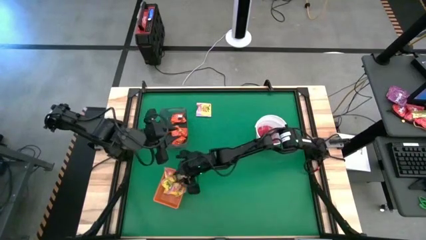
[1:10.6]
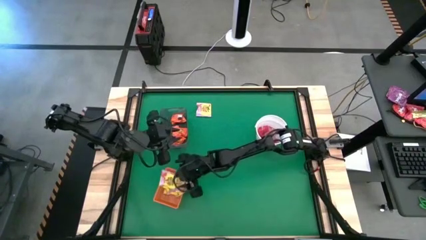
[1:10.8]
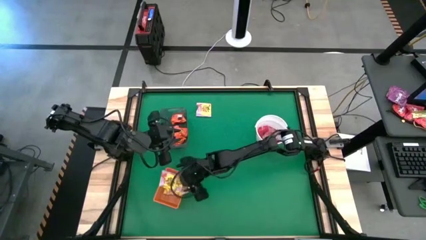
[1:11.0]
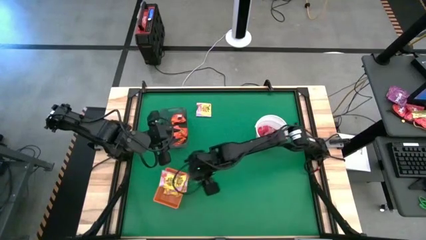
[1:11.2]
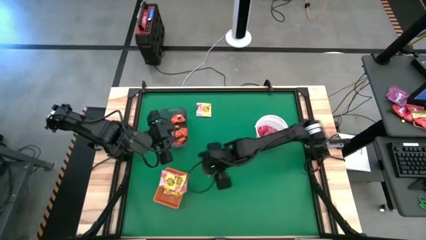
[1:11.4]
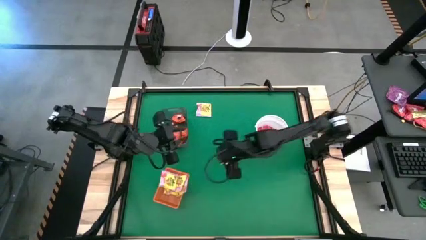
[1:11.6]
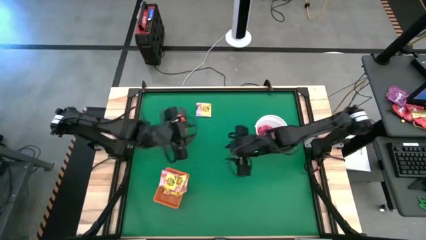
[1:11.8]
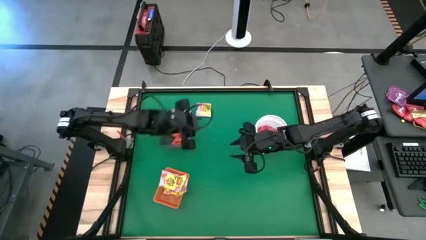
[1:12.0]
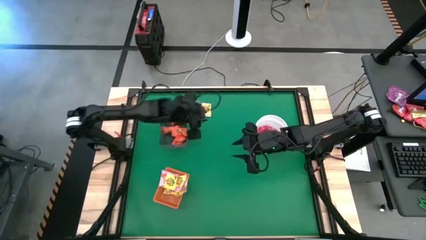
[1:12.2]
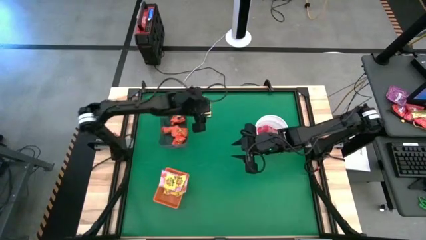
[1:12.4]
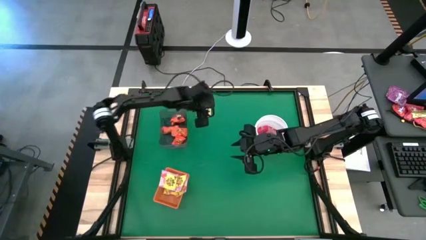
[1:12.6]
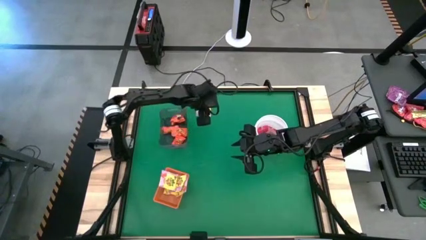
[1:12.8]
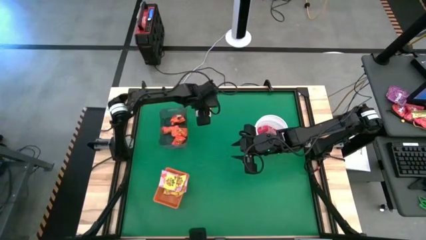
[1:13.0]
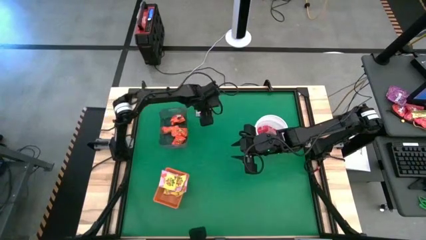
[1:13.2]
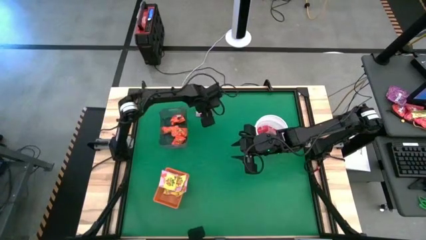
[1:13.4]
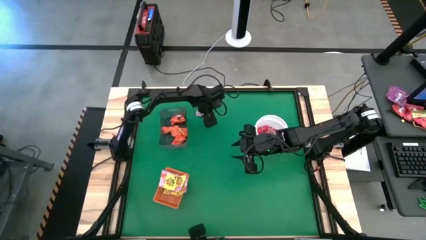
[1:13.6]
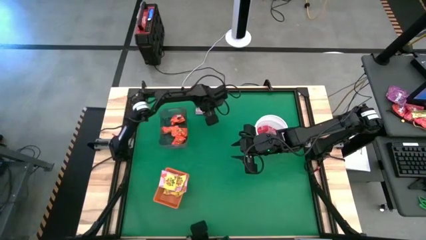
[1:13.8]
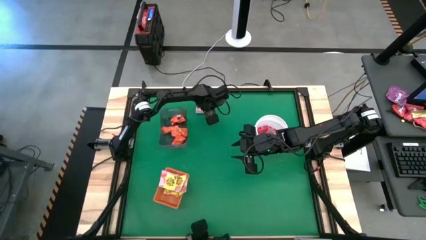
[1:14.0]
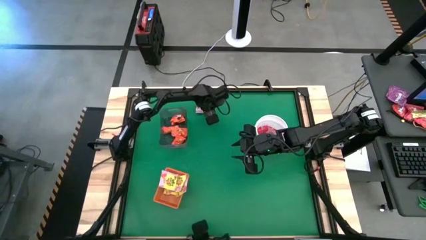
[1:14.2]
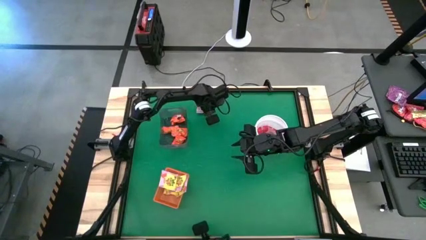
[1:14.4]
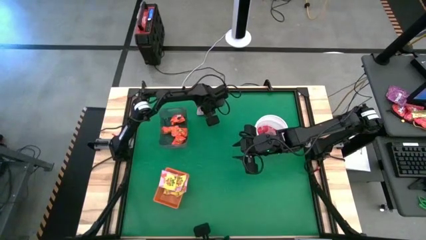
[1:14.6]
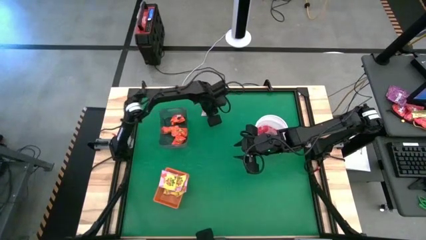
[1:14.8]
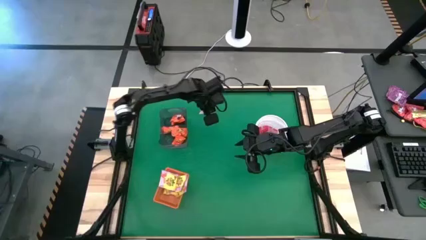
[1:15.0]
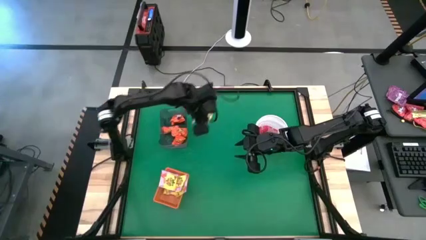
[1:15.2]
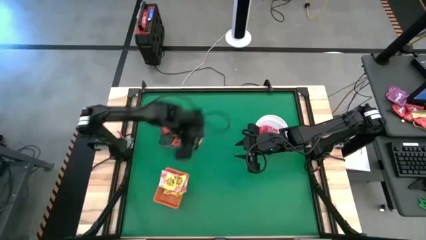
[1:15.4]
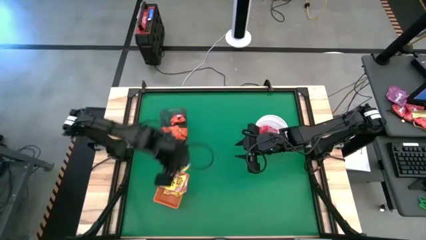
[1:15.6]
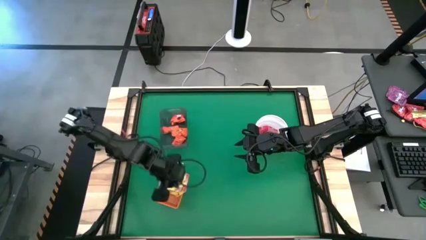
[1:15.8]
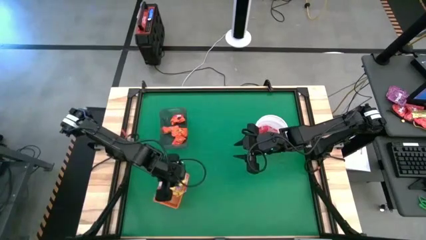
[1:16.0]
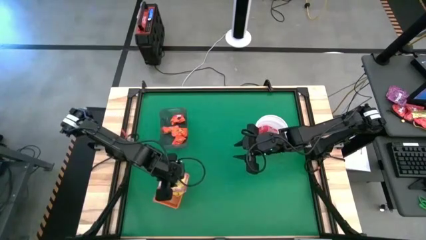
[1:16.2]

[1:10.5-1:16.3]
Task: Sort candy by brand, put in halloween buckets
Put the yellow candy into the orange bin

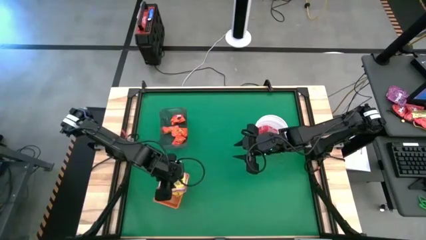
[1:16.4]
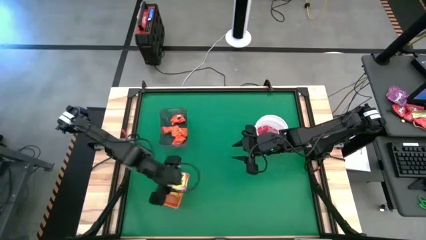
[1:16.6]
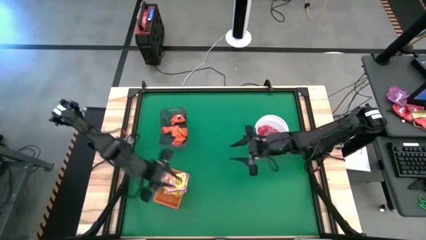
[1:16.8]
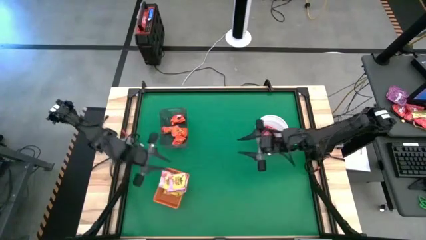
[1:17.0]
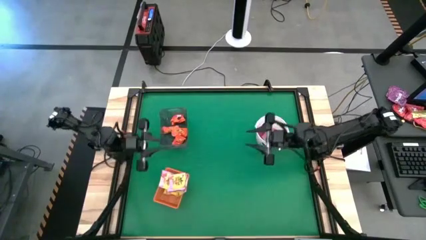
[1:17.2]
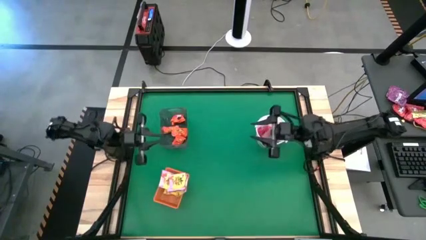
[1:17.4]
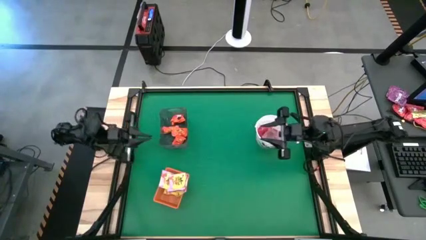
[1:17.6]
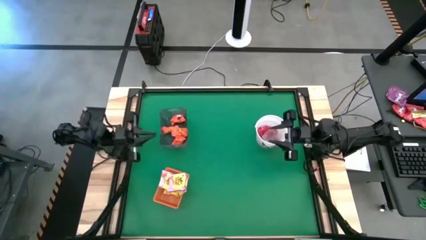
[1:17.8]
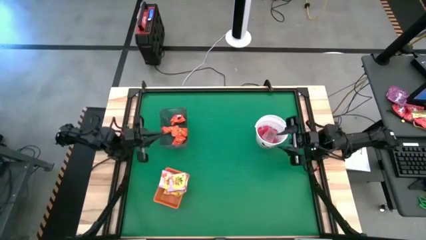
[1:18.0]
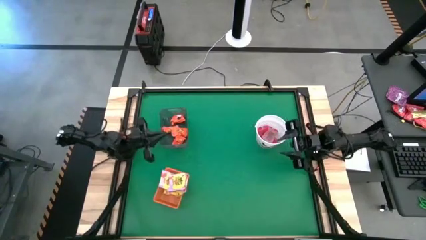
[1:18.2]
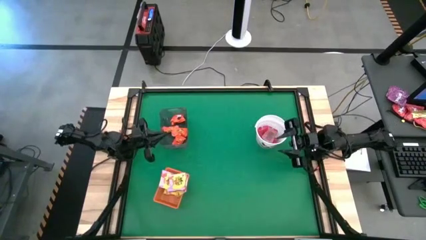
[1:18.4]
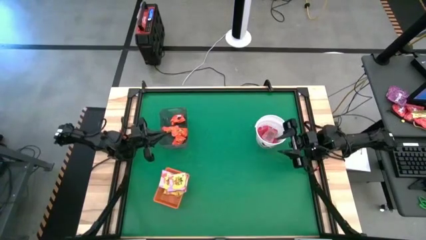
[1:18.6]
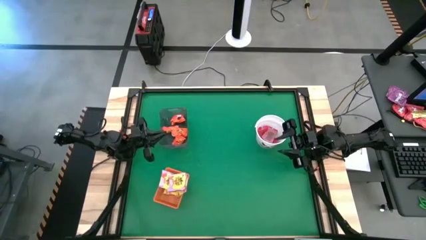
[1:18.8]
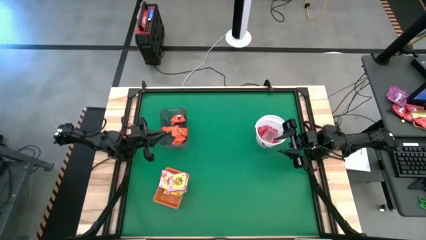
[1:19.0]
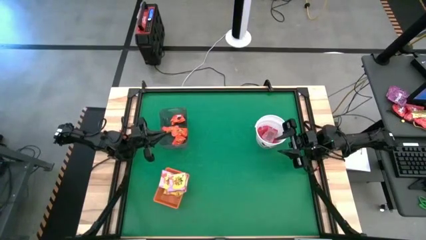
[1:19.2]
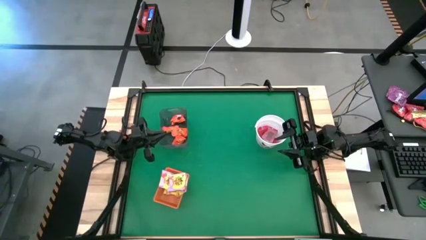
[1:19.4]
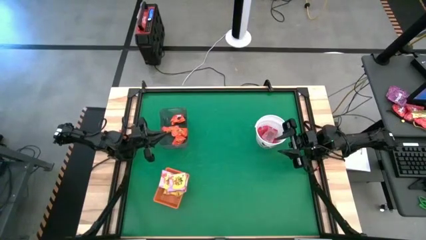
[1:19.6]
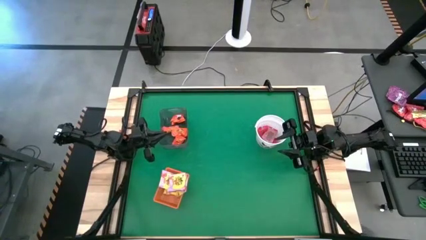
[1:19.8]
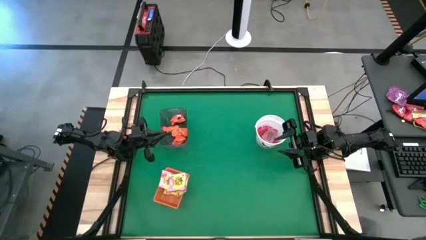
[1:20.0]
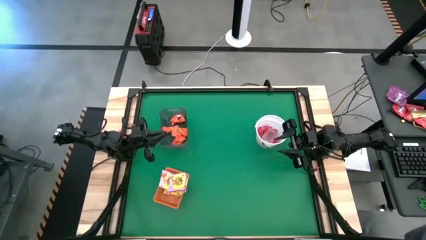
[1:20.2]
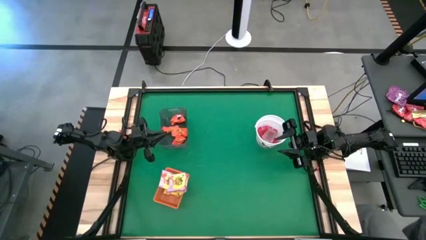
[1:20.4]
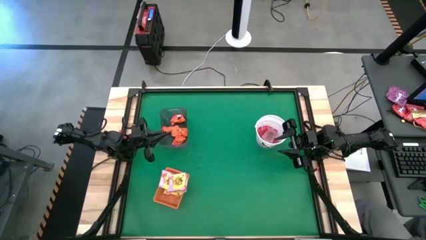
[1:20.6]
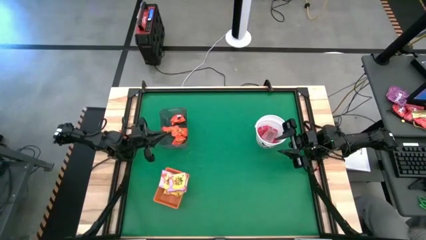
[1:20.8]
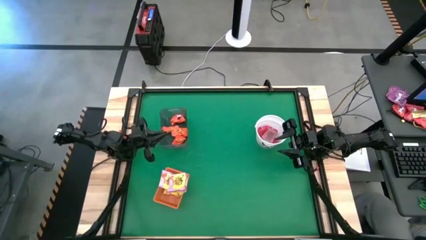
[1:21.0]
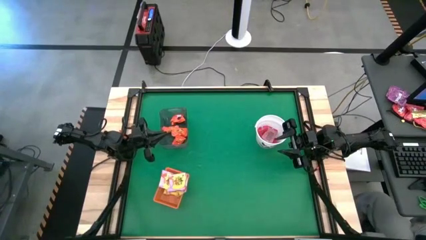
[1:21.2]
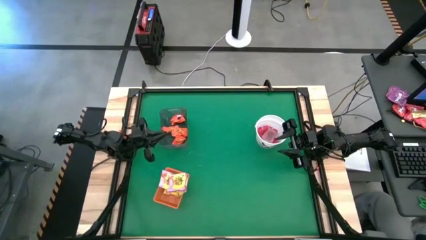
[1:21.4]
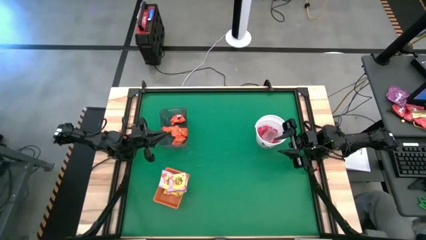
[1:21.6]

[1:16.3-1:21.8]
Return to Home Position

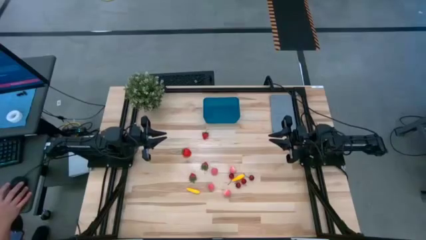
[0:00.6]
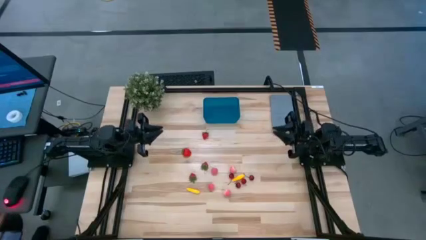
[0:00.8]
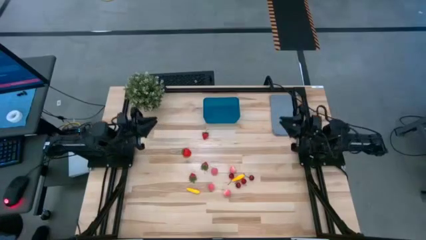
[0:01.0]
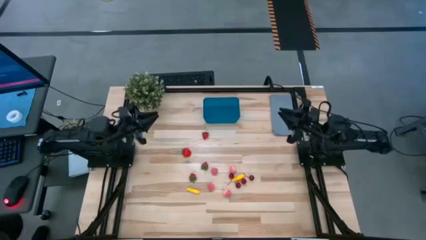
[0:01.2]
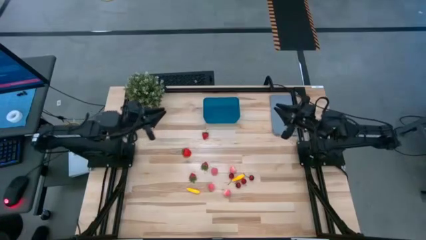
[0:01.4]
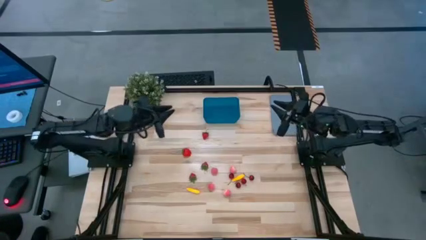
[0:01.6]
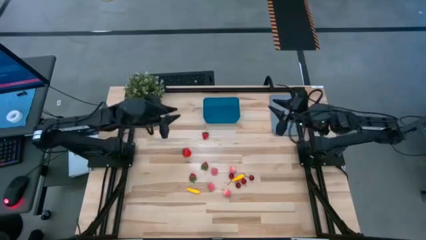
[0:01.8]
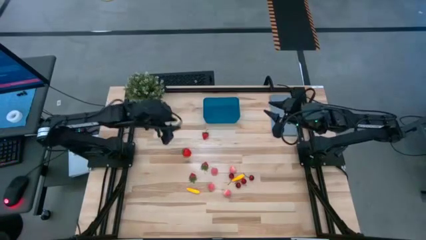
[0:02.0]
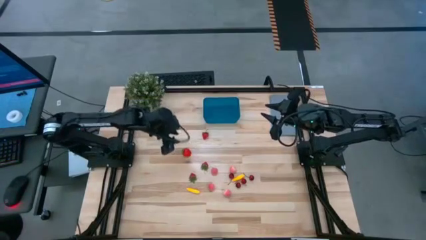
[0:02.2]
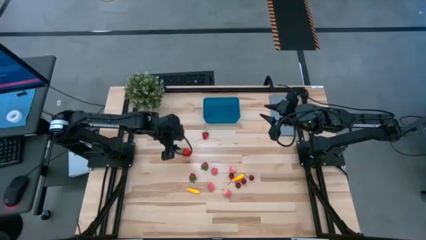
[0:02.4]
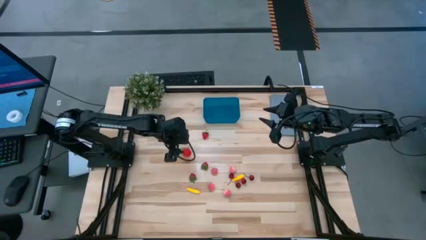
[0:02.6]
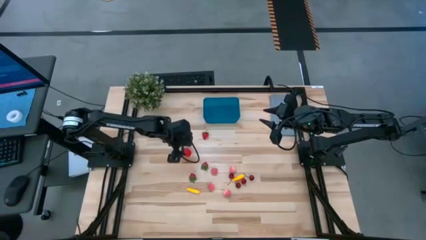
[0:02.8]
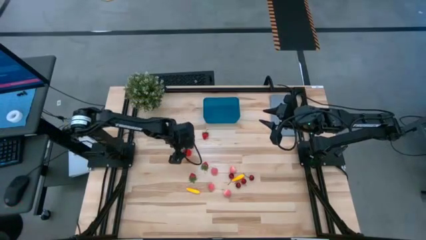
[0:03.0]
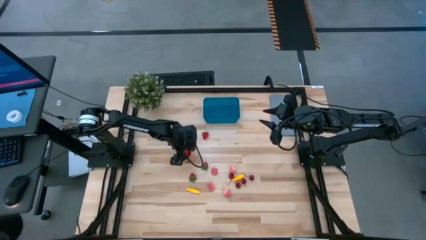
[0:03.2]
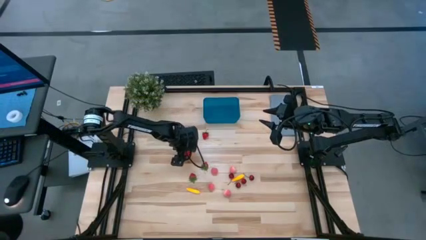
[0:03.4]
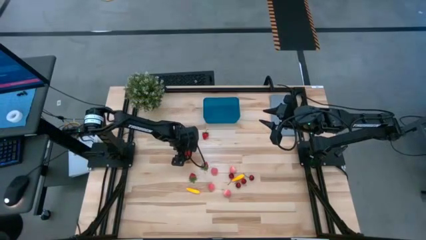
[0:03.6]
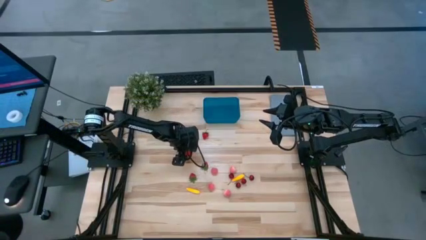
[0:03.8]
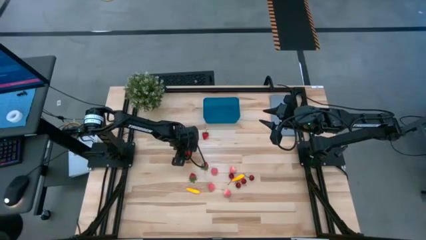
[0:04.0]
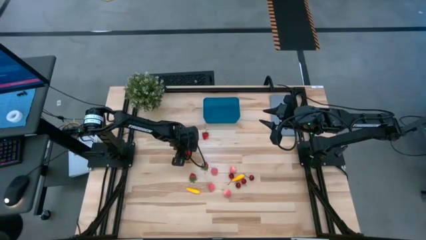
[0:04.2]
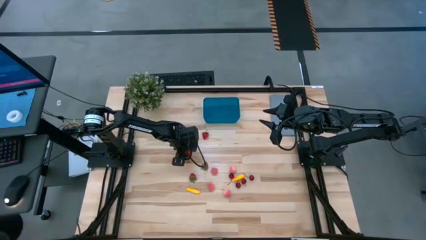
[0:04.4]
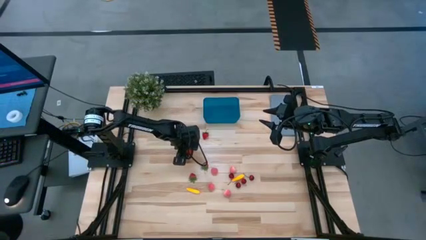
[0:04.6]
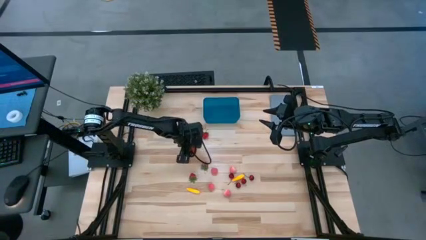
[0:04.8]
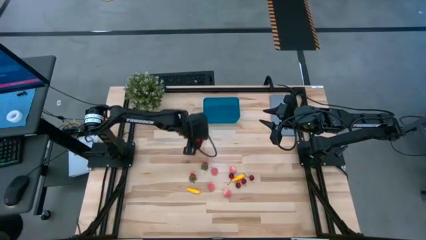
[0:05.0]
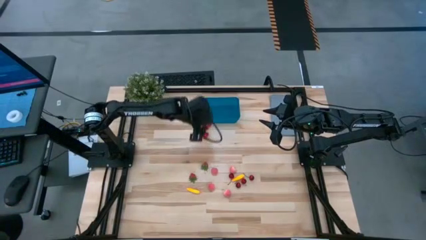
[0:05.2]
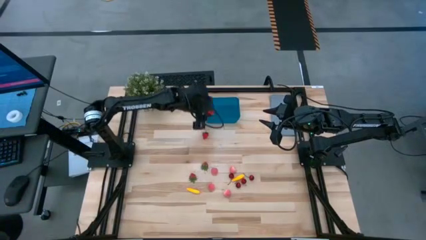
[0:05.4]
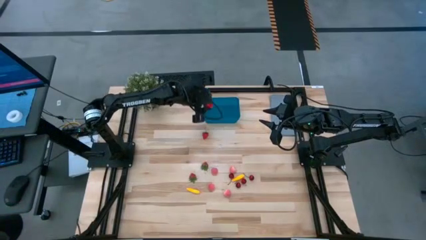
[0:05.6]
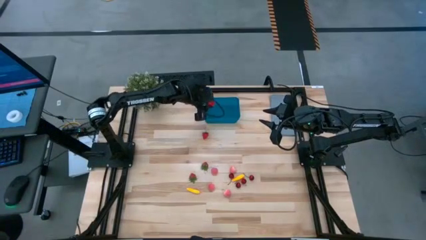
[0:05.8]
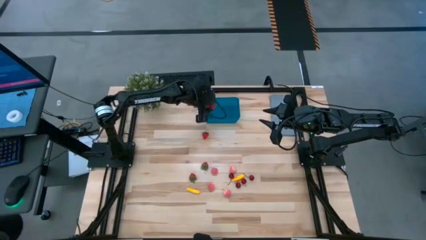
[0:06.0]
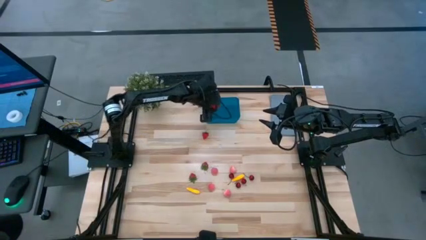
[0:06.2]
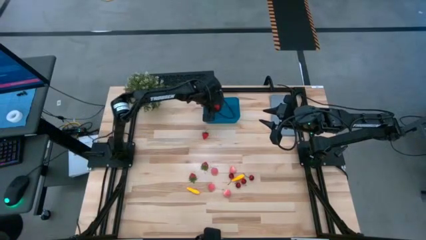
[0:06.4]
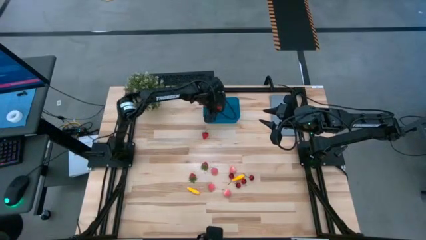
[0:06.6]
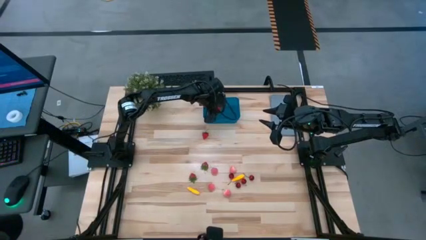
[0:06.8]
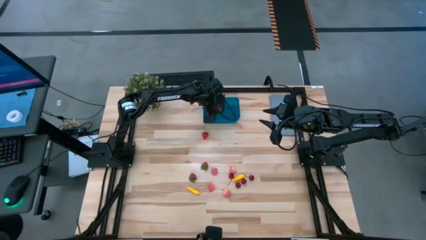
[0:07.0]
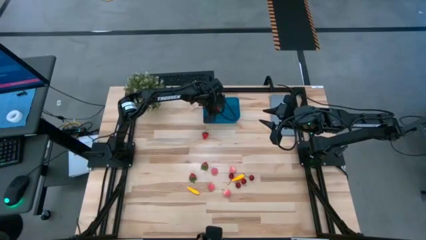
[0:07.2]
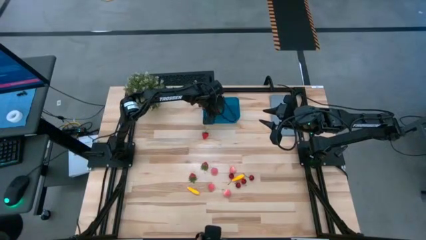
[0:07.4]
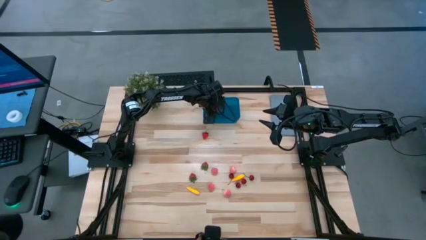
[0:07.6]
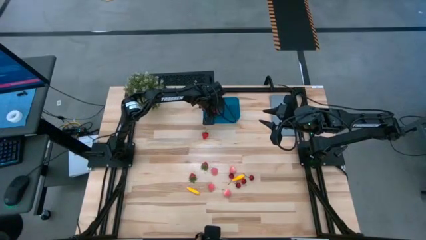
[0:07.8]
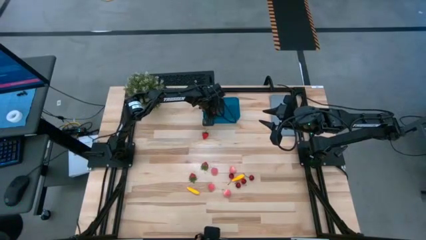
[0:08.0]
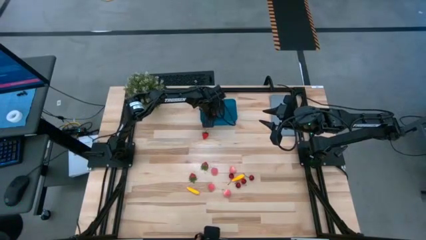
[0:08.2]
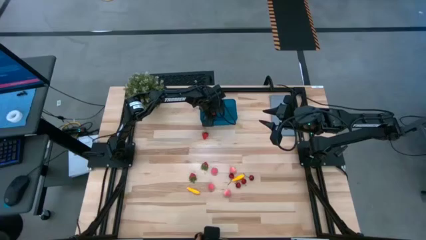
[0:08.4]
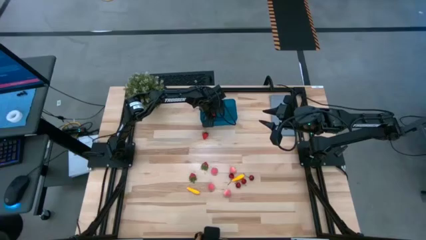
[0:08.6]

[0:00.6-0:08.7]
Task: Pick and placing Produce into tupperware
Put the strawberry into the blue bin
